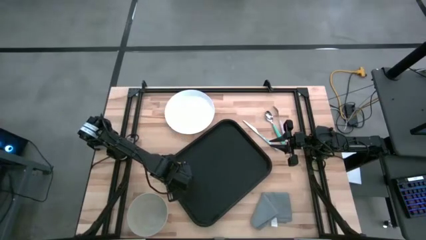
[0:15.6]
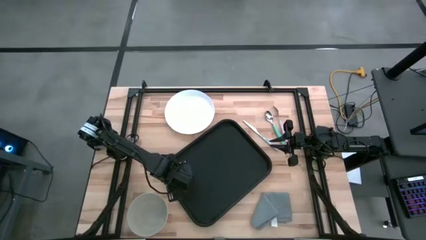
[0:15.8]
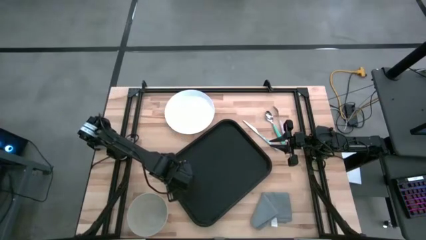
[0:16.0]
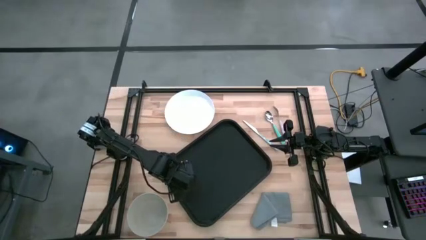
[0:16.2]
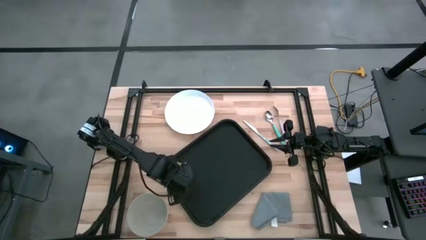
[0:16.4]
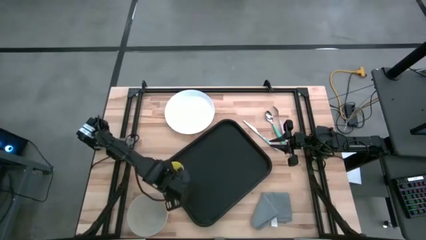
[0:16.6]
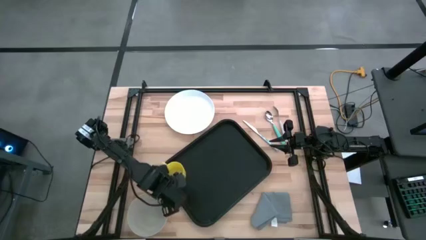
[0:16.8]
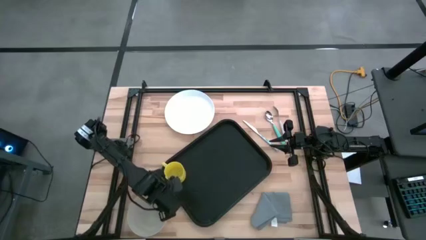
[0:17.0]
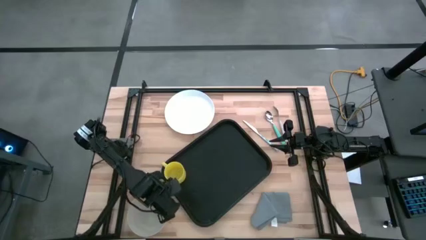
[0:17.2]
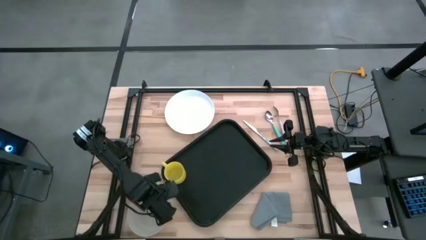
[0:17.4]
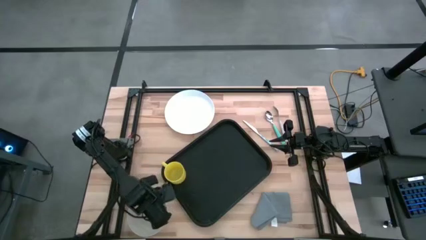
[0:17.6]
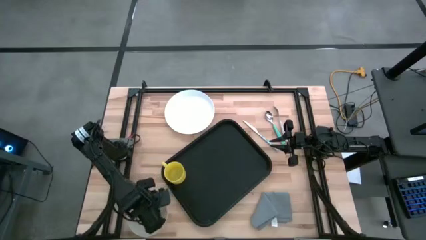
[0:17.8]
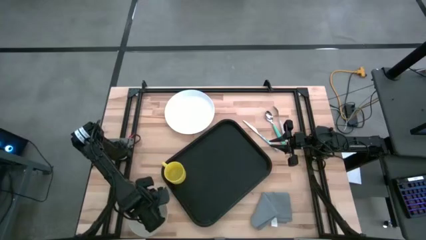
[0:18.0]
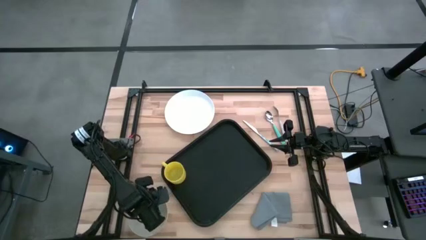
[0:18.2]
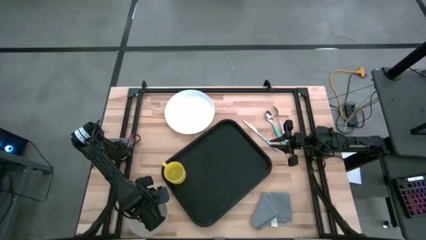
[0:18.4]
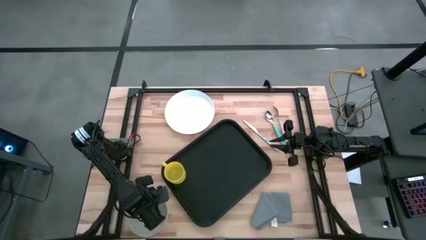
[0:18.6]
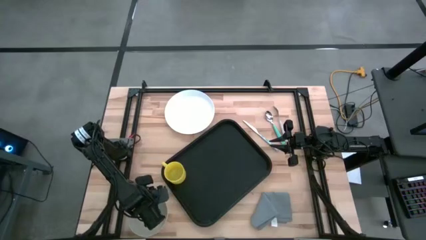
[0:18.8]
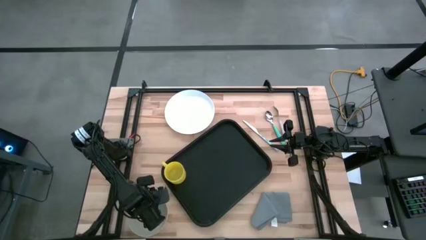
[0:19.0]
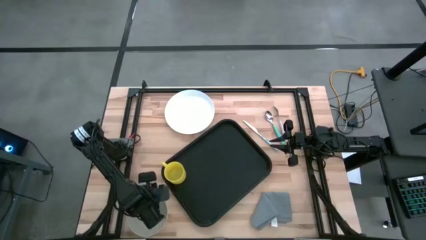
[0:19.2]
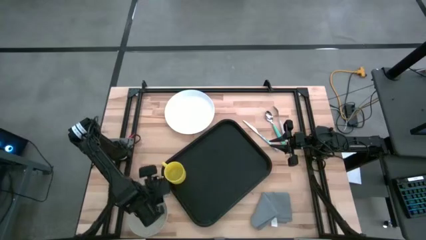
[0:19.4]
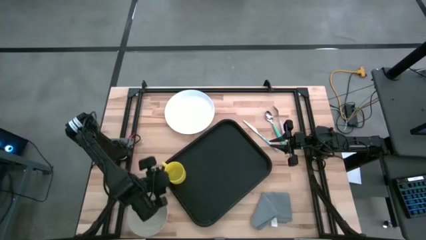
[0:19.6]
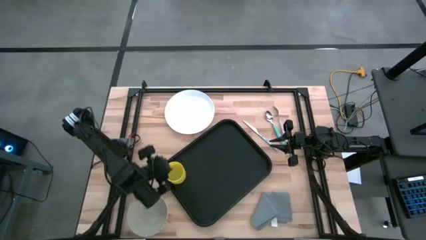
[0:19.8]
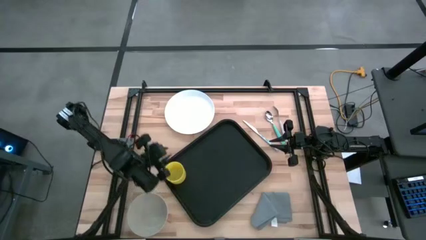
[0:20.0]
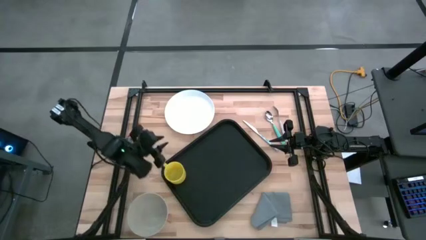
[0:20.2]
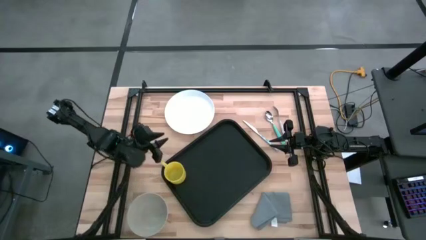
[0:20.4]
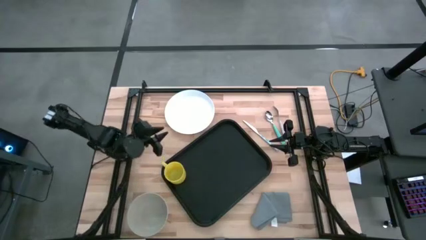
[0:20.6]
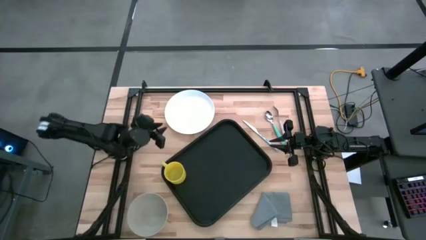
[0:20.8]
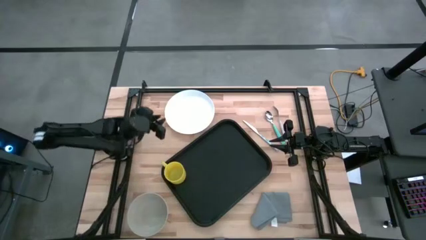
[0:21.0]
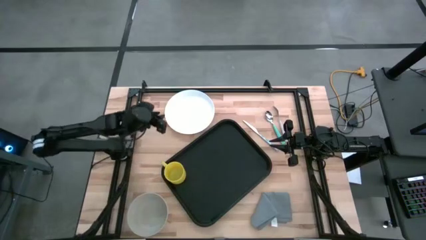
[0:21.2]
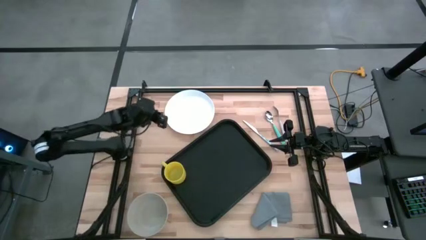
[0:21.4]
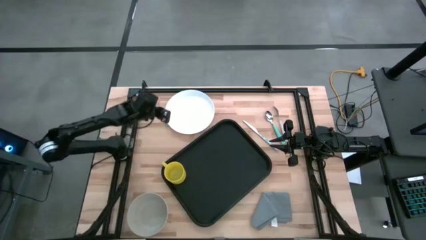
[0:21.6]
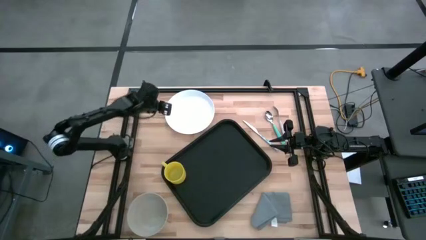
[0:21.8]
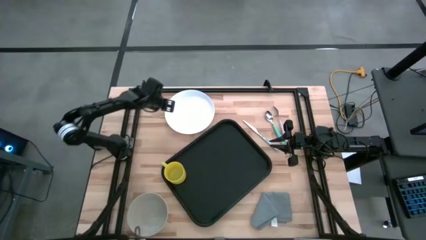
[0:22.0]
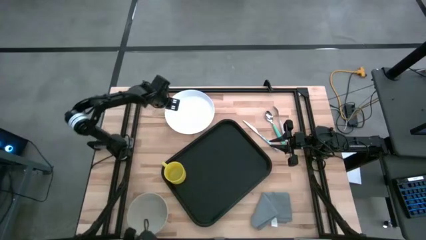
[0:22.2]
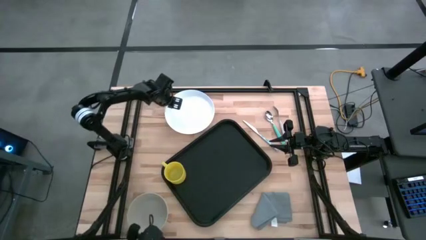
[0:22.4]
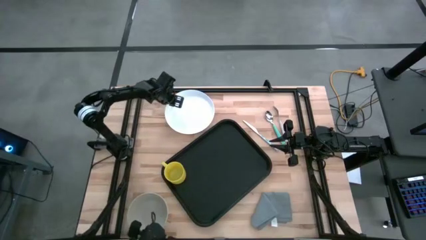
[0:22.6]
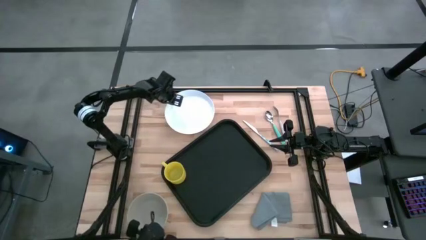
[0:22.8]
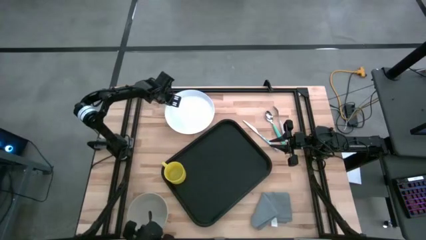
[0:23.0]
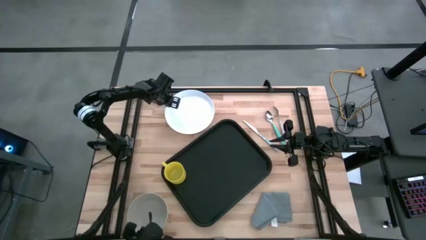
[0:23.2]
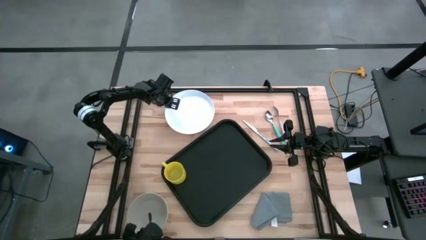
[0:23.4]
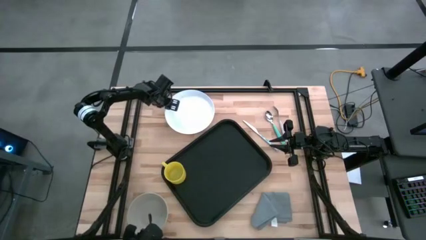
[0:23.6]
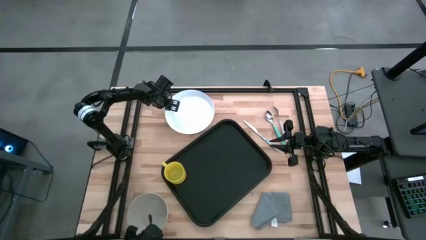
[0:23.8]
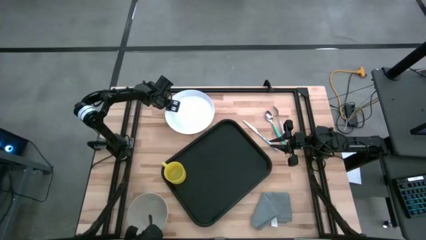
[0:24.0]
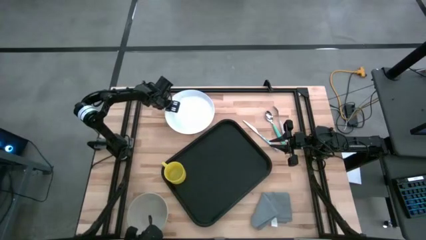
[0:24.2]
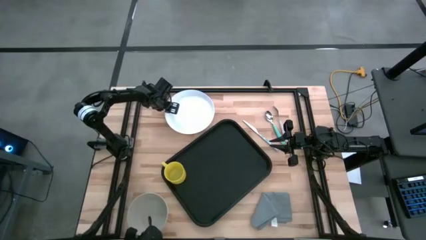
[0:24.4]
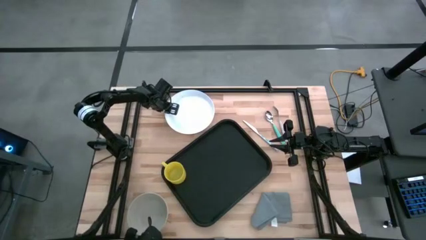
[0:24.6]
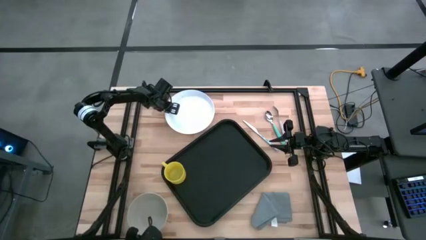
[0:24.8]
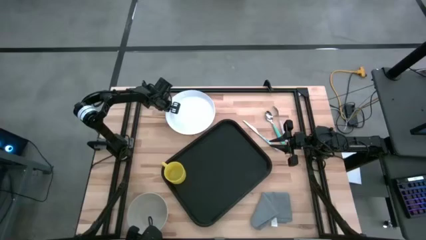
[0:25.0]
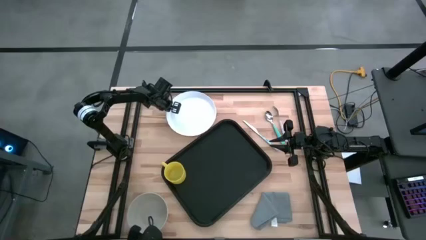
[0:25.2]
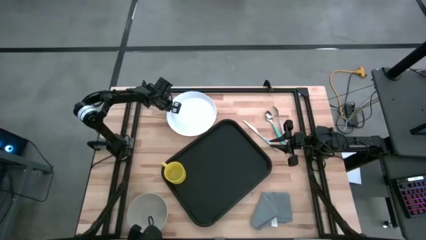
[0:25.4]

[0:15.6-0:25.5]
Task: Set up tray
Put the white plate on the black serving tray
